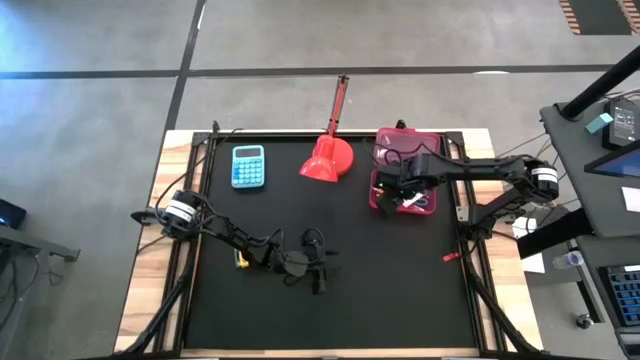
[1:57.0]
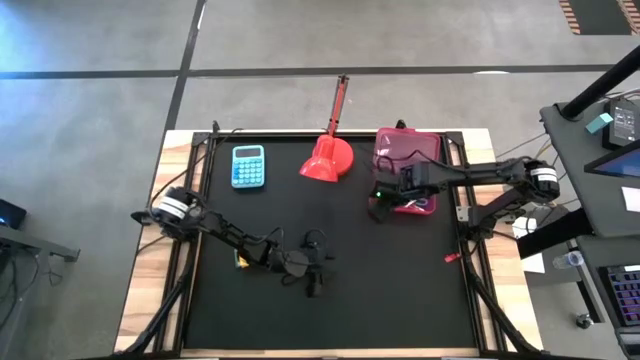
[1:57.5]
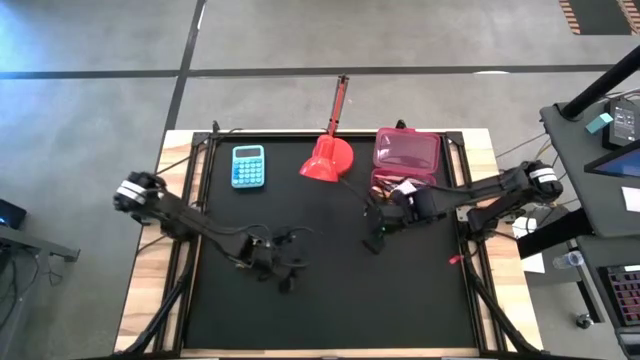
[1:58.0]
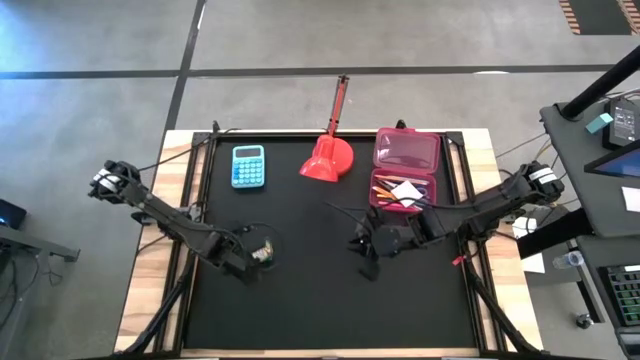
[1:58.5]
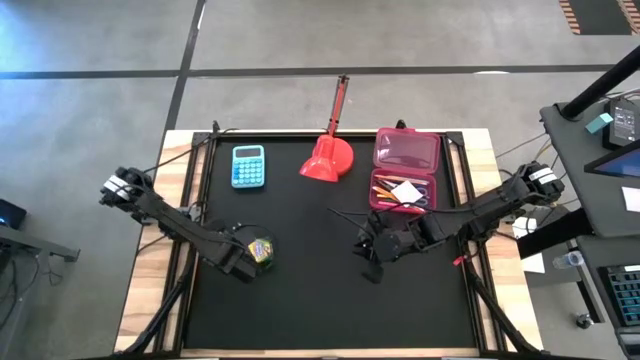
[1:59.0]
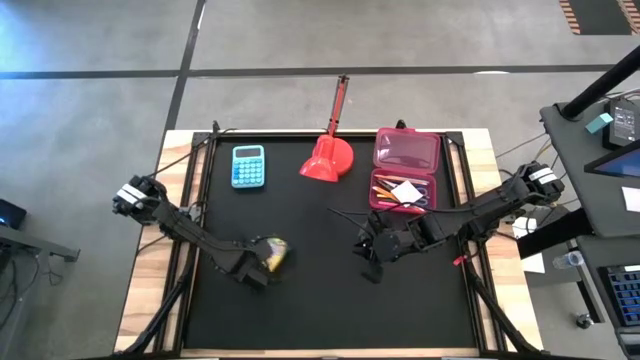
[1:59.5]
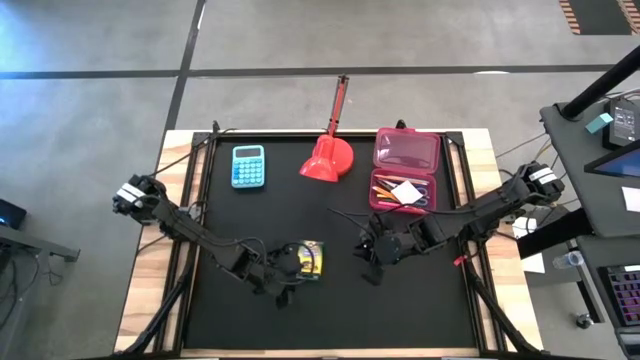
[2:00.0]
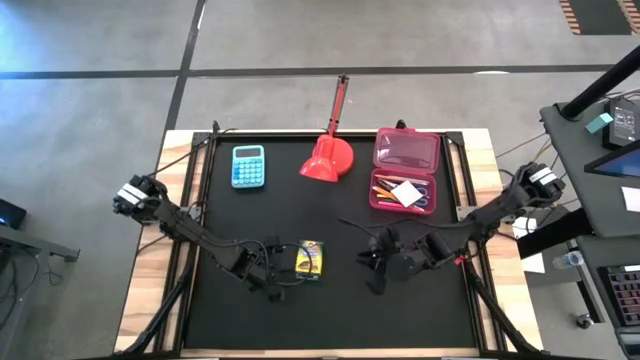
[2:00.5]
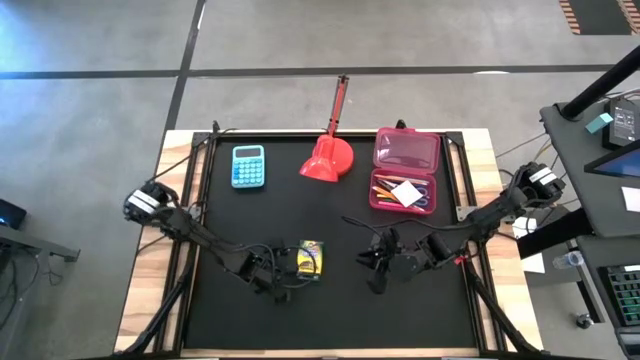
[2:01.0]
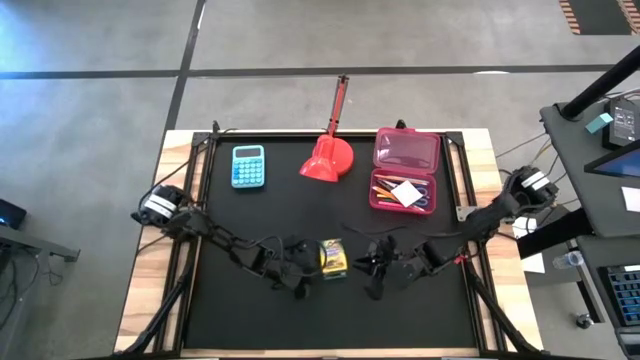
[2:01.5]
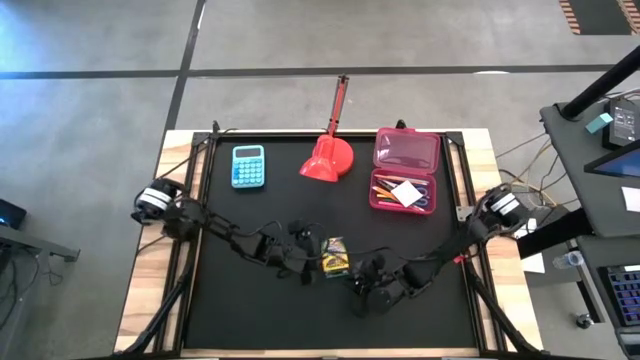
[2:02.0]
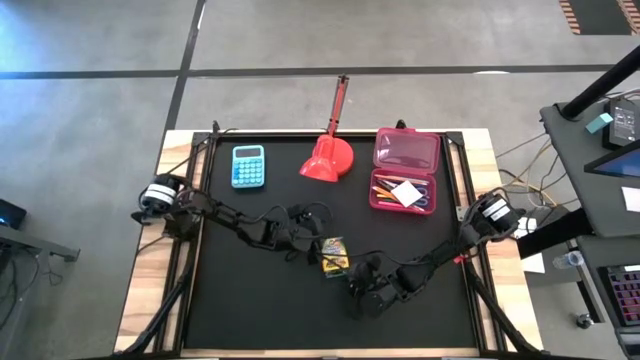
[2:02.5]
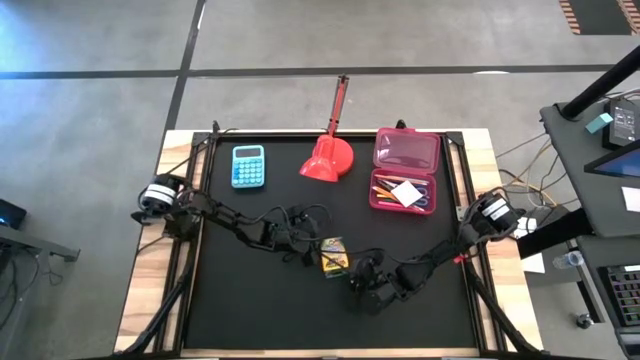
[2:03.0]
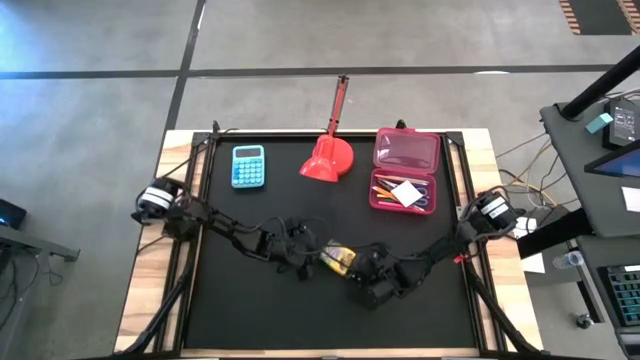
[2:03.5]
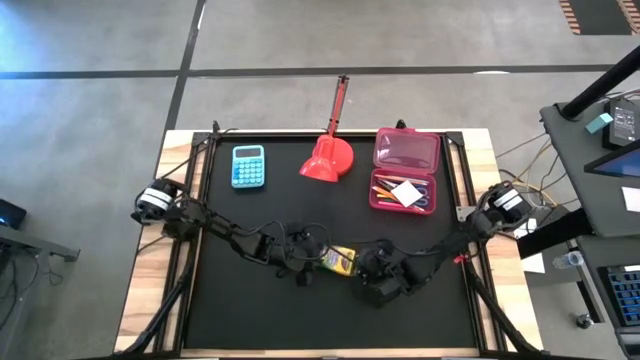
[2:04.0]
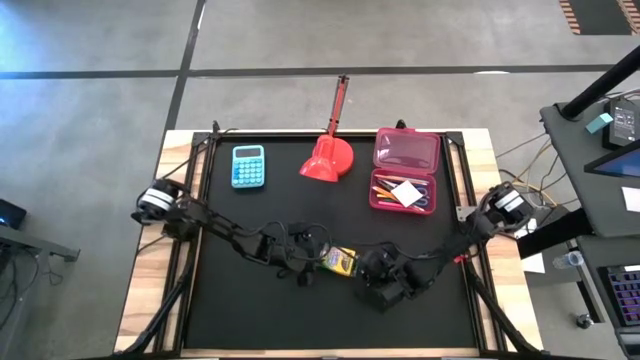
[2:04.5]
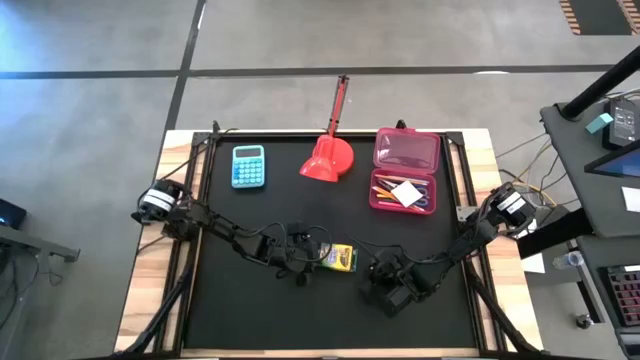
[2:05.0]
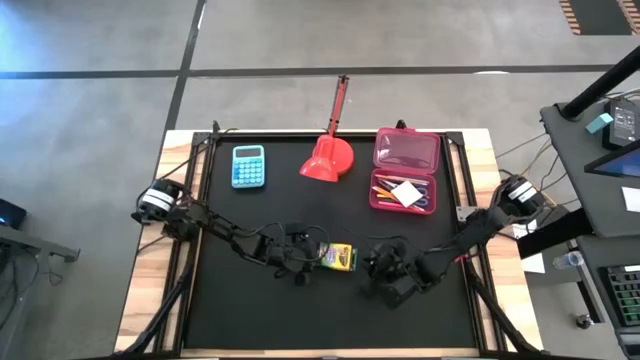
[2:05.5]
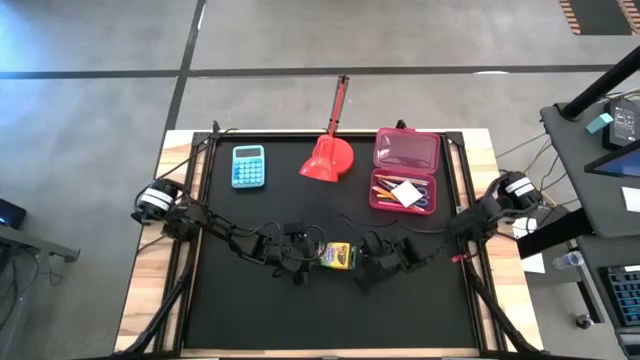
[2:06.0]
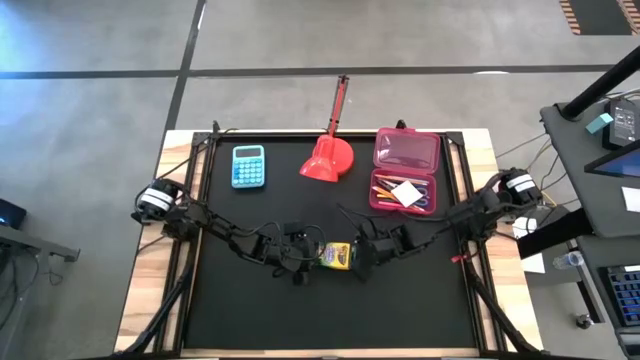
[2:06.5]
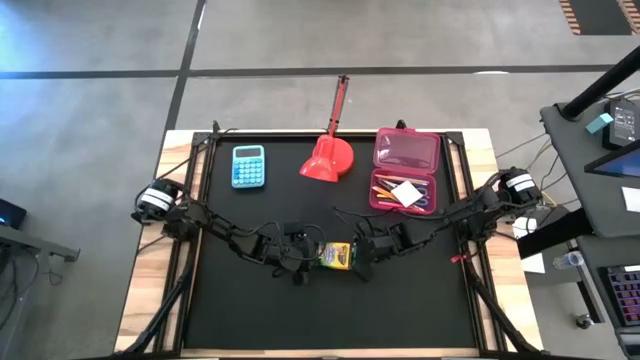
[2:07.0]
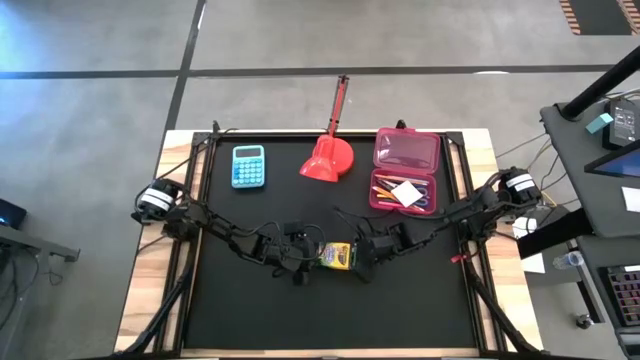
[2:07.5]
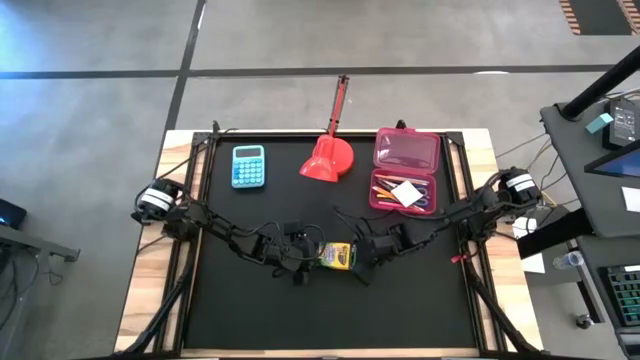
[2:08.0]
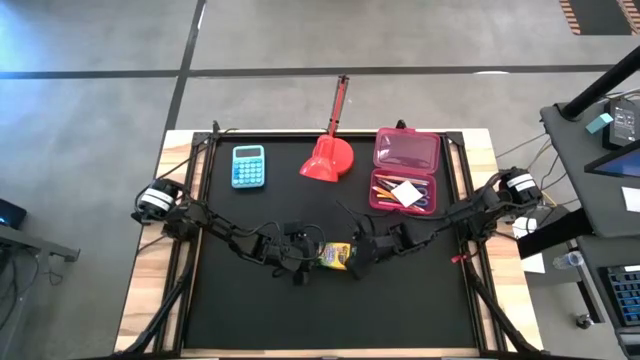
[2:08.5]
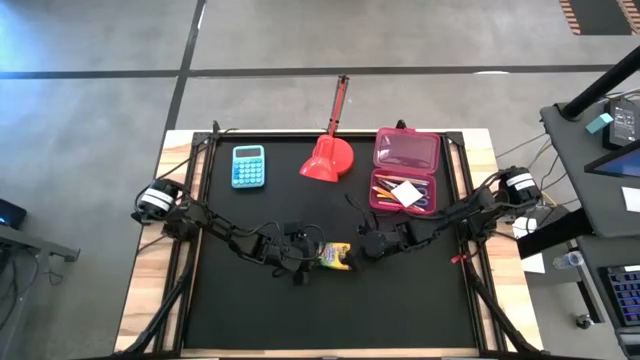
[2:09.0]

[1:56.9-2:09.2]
Task: Pack school essentials
Put the yellow box of crayons into the pink supply box

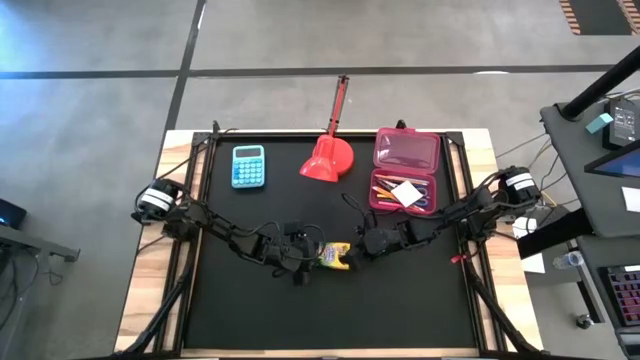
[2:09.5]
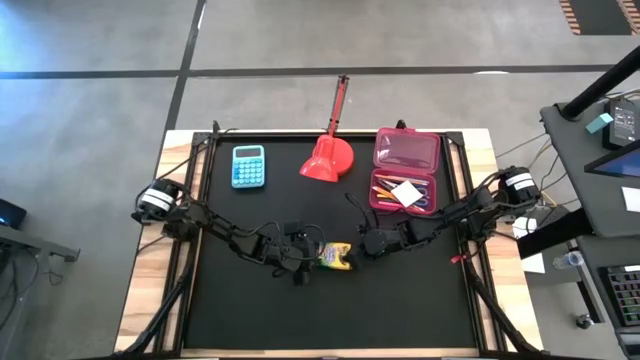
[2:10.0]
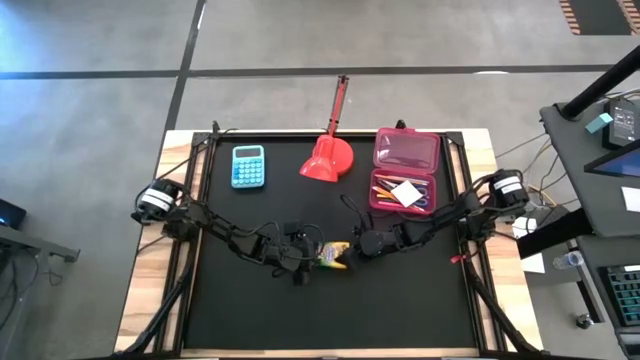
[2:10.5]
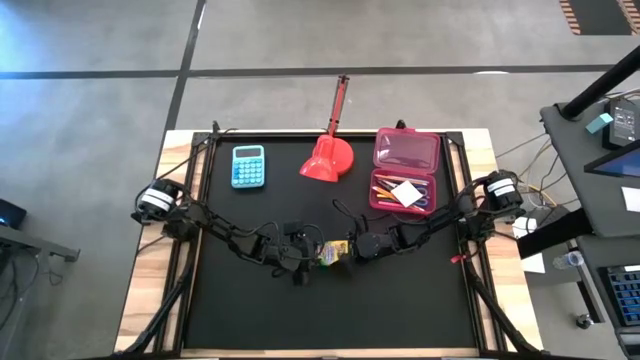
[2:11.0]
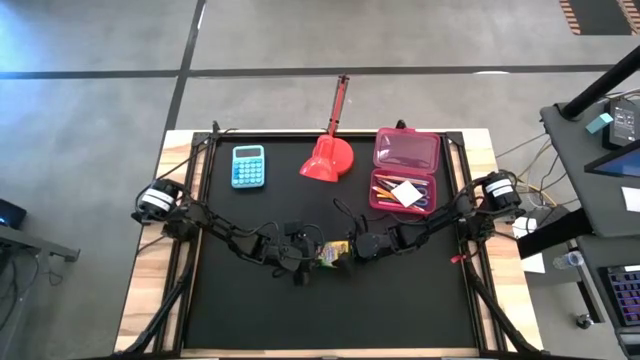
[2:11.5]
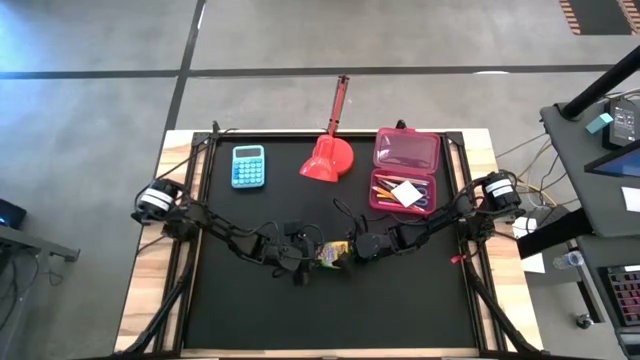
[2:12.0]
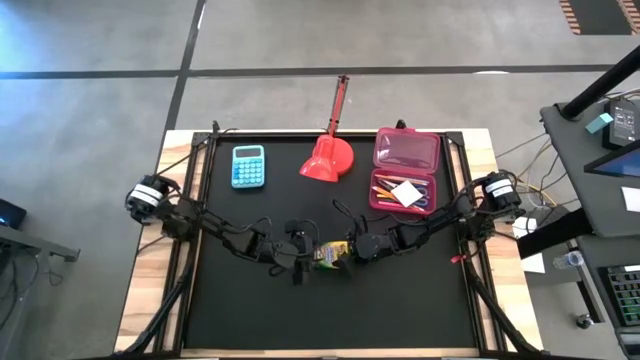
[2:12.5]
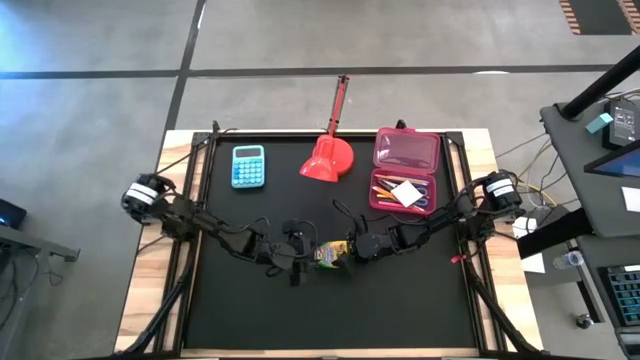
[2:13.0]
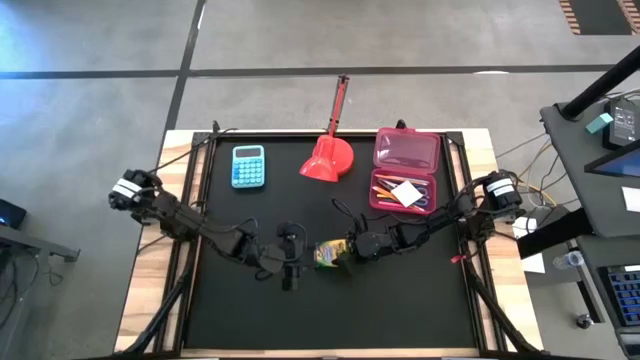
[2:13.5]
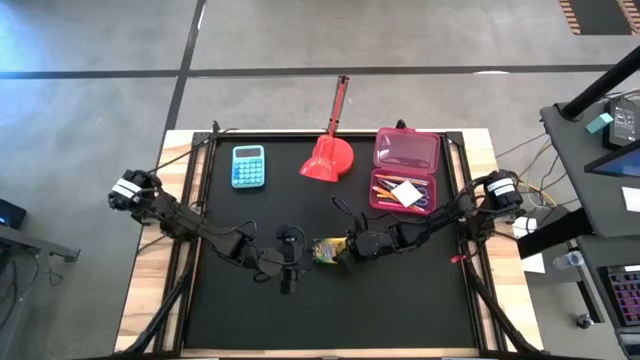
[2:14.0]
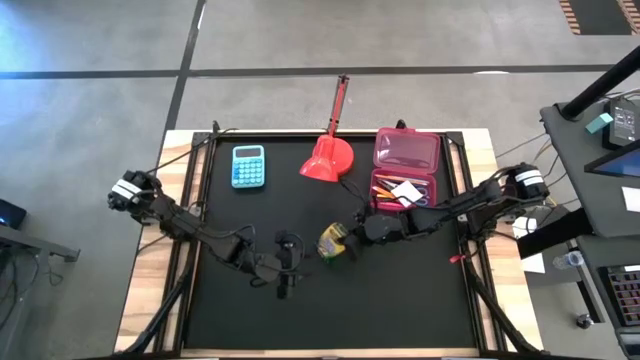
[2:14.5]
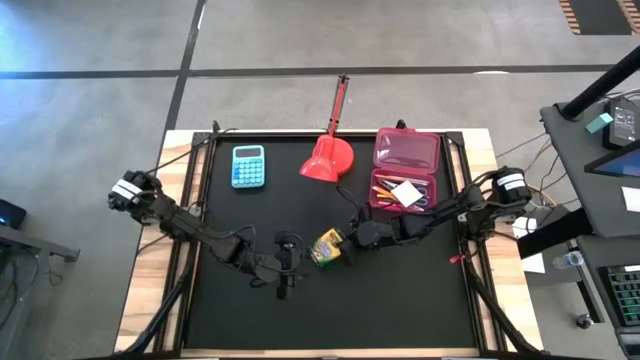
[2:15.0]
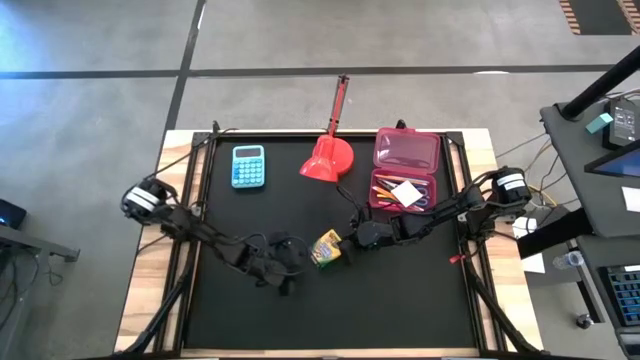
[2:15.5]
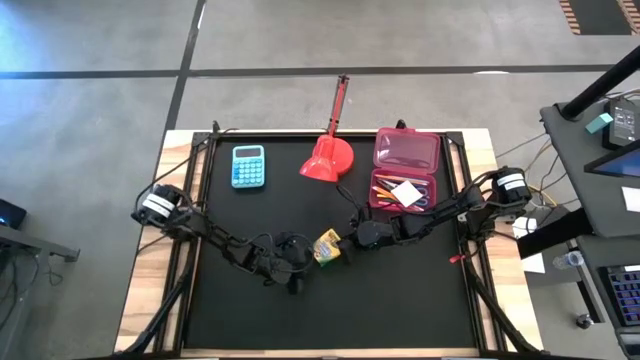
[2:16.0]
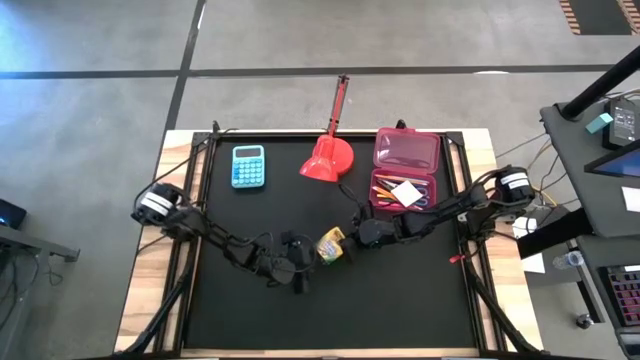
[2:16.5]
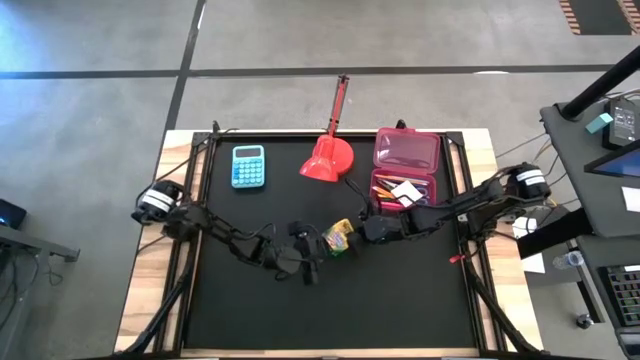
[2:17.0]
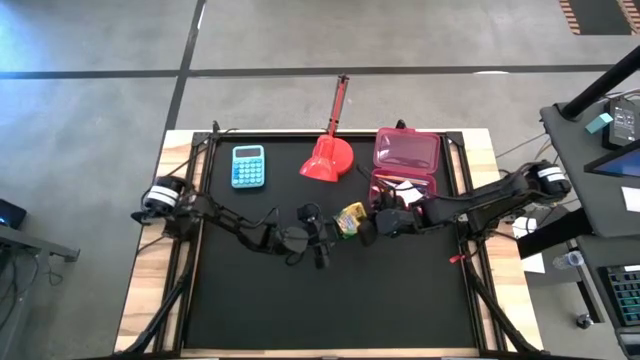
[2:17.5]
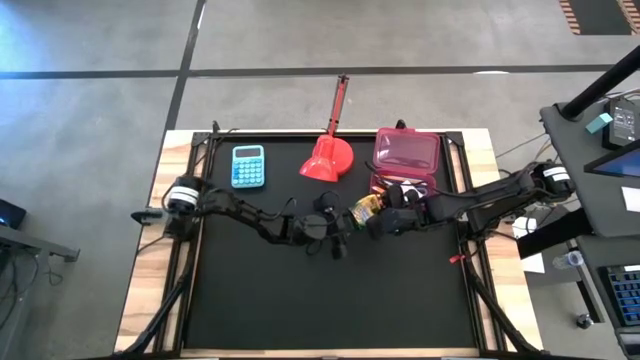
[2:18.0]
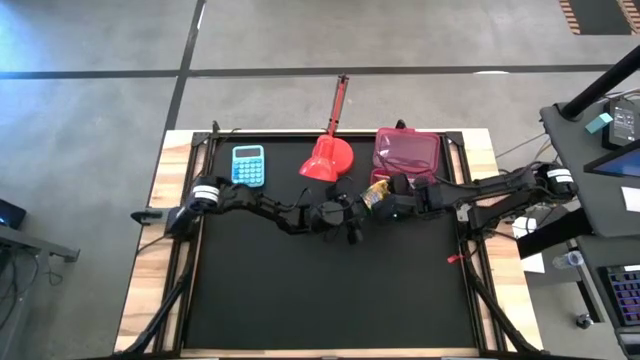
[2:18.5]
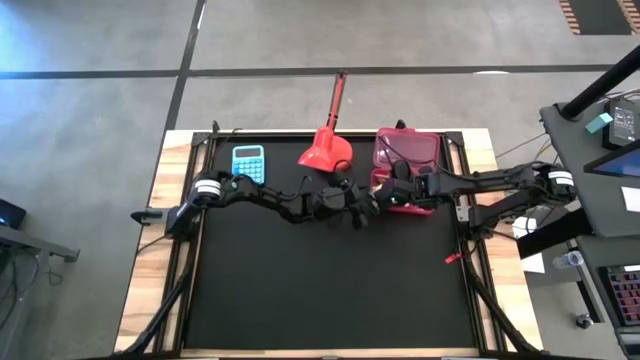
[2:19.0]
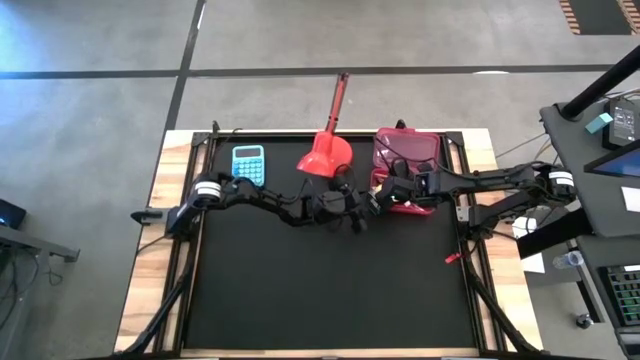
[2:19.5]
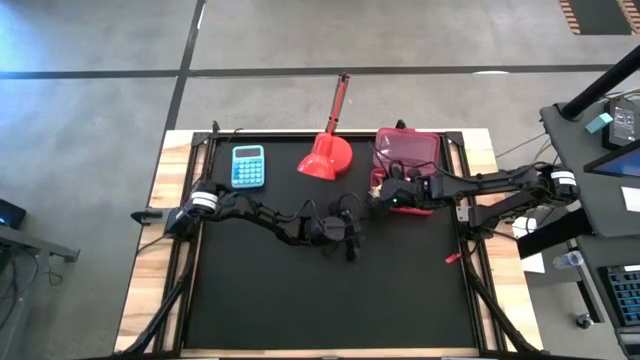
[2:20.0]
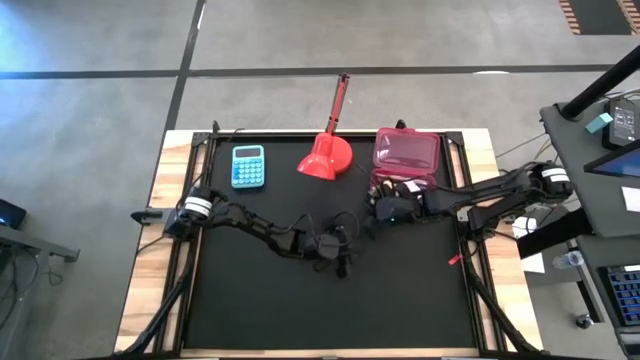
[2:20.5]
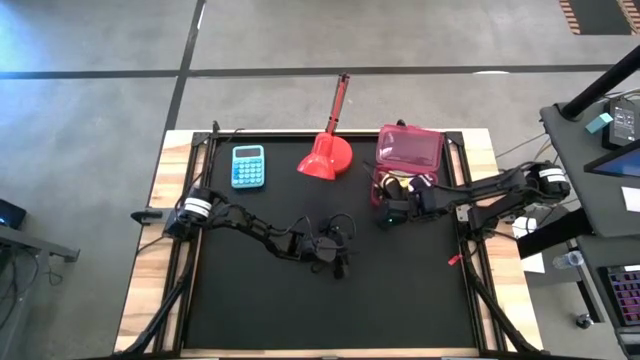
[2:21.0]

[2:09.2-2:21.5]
Put the yellow box of crayons into the pink supply box
